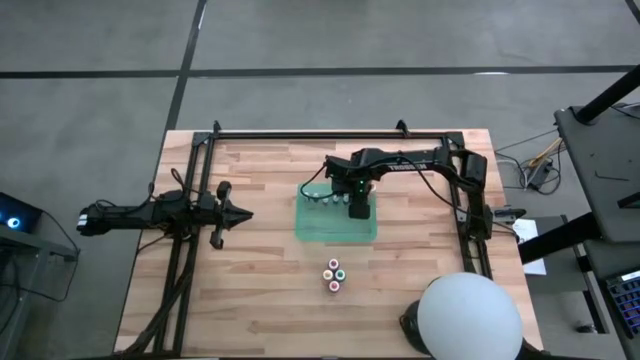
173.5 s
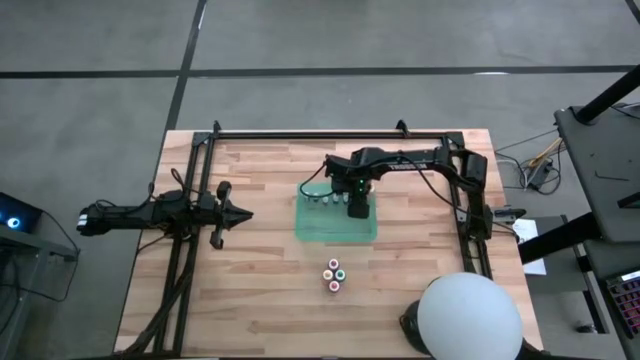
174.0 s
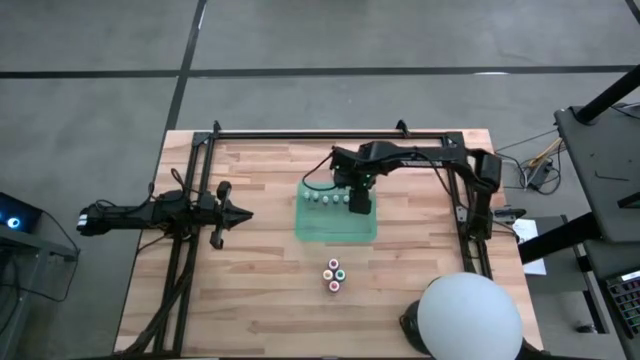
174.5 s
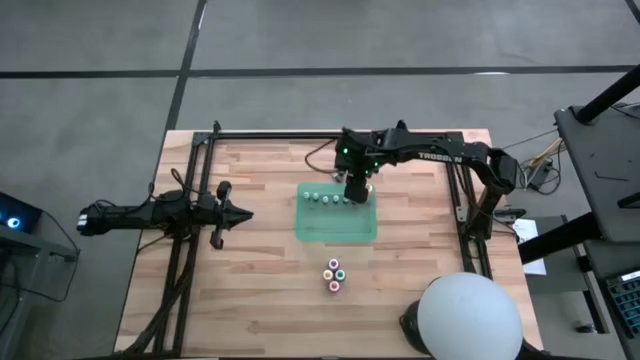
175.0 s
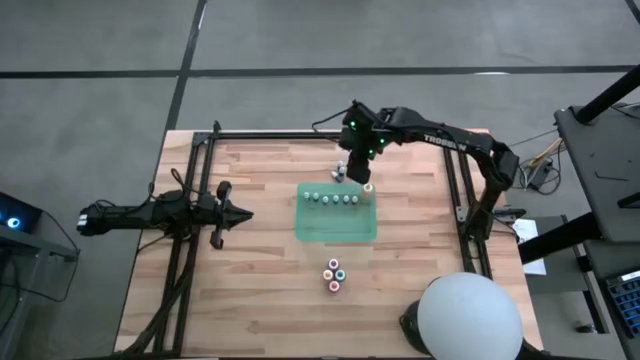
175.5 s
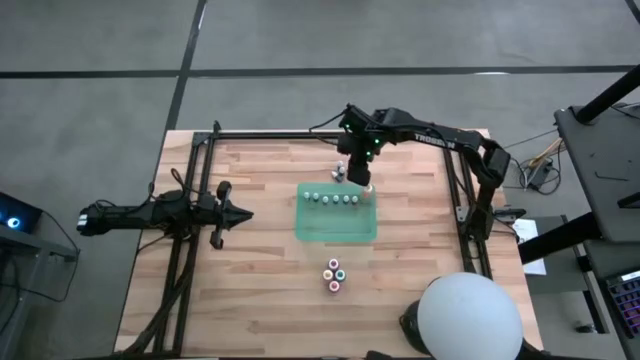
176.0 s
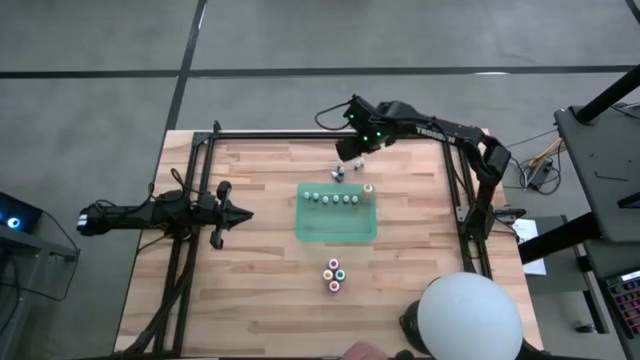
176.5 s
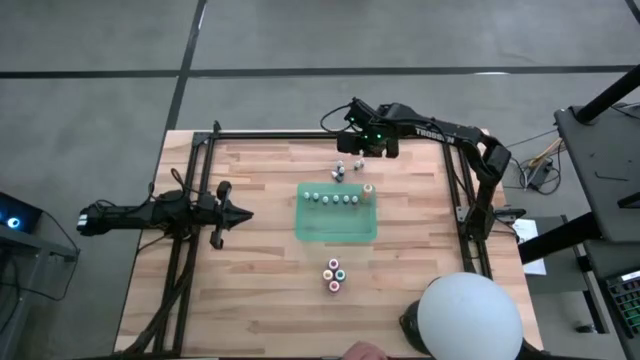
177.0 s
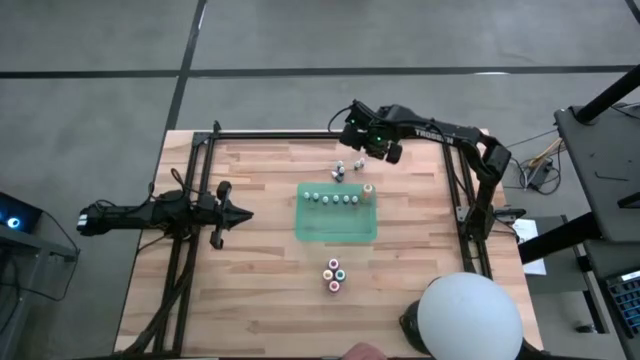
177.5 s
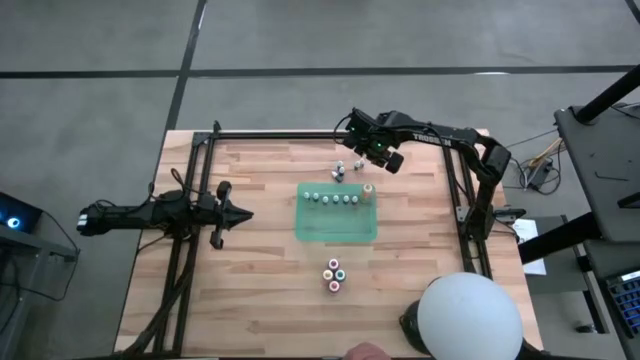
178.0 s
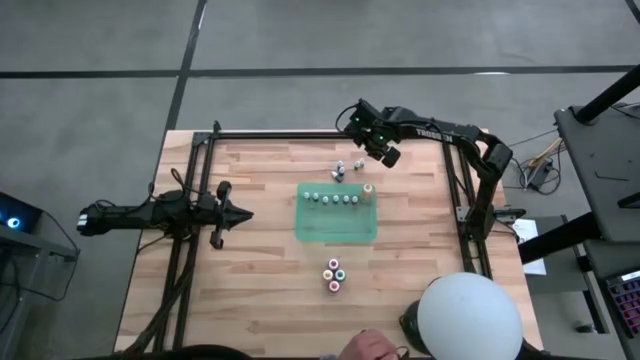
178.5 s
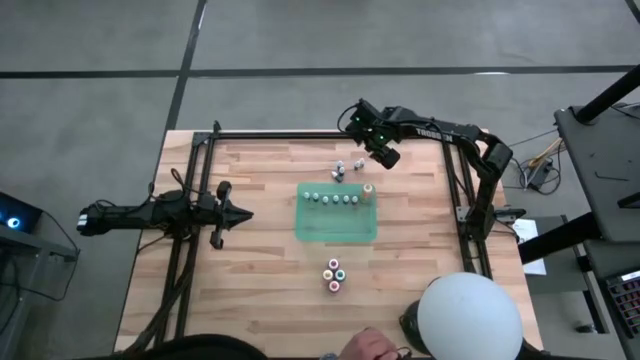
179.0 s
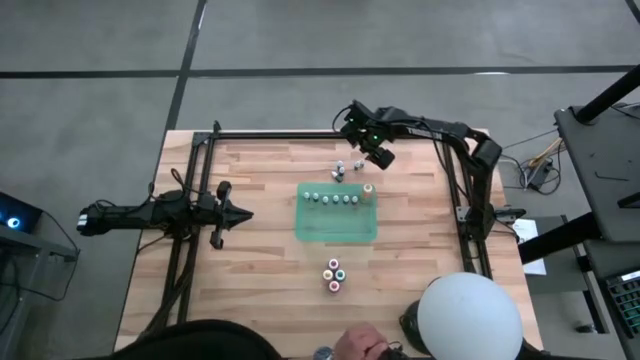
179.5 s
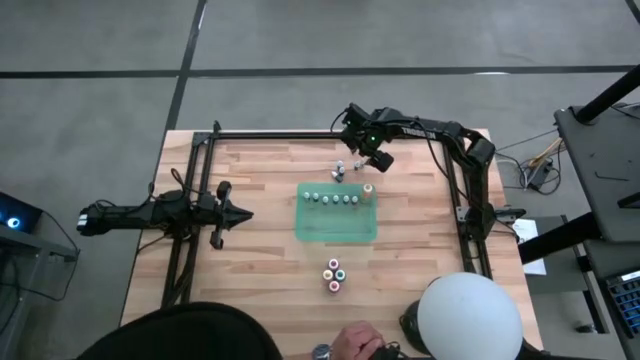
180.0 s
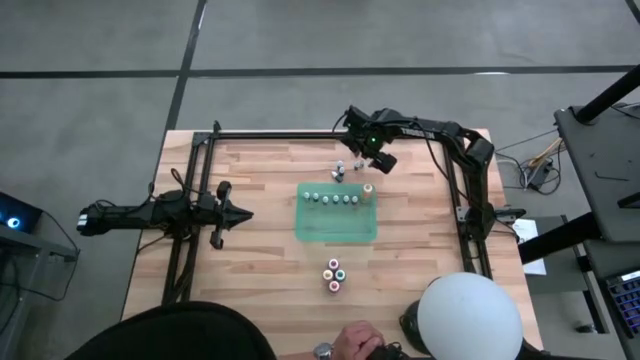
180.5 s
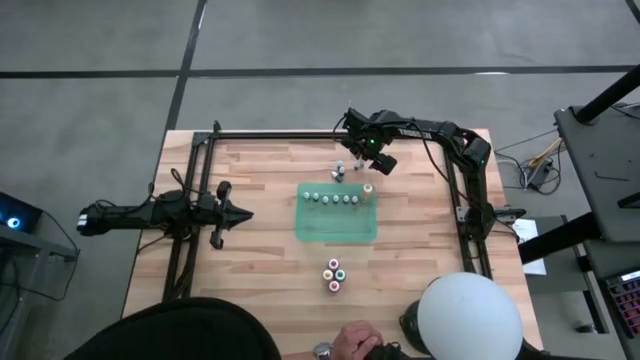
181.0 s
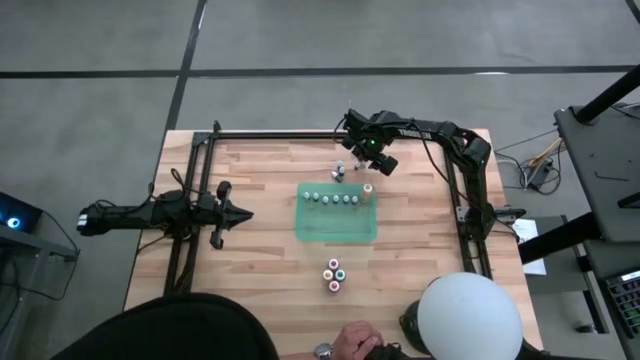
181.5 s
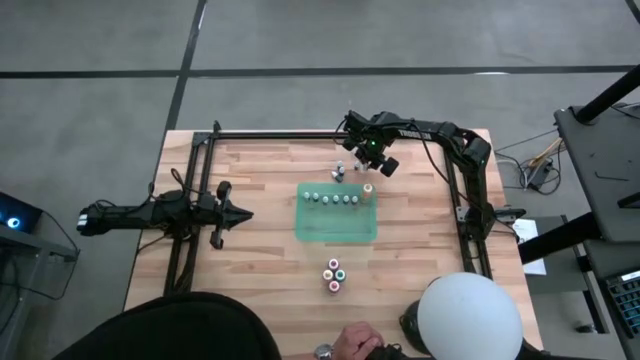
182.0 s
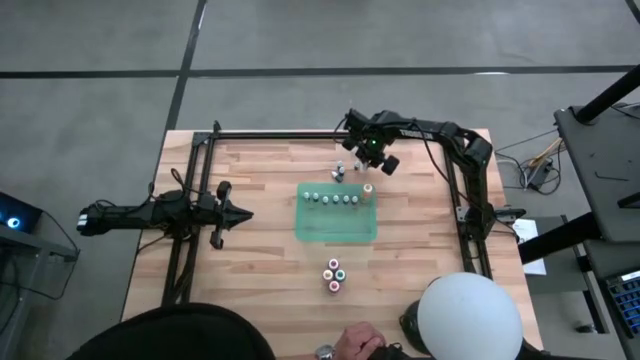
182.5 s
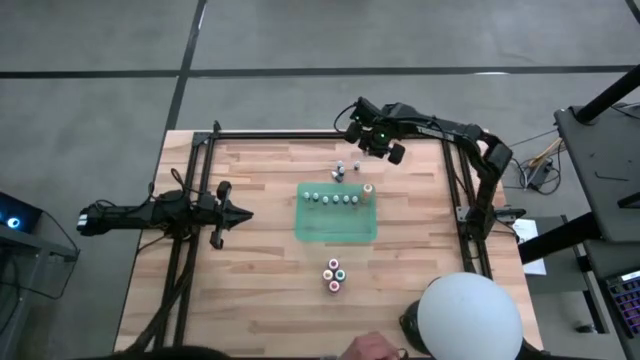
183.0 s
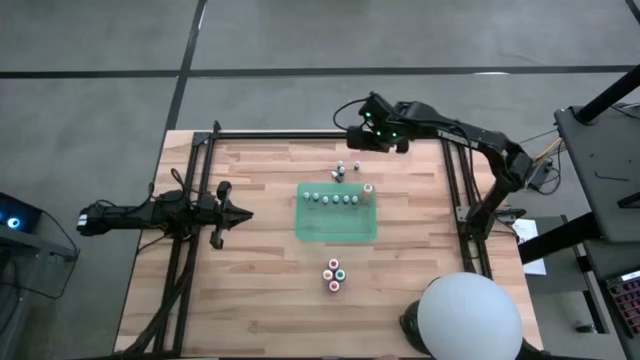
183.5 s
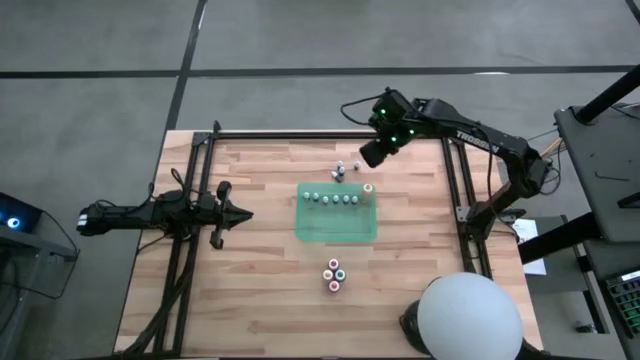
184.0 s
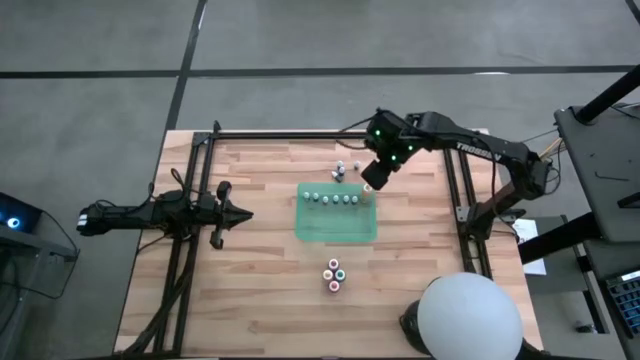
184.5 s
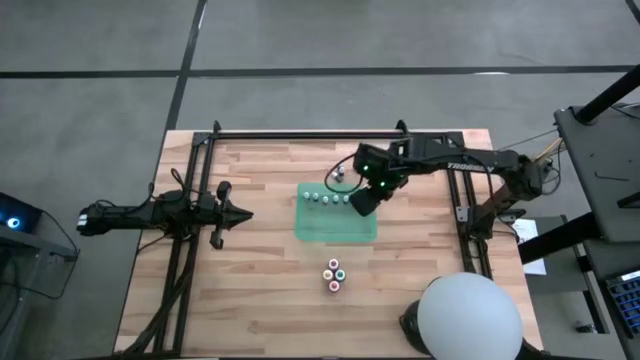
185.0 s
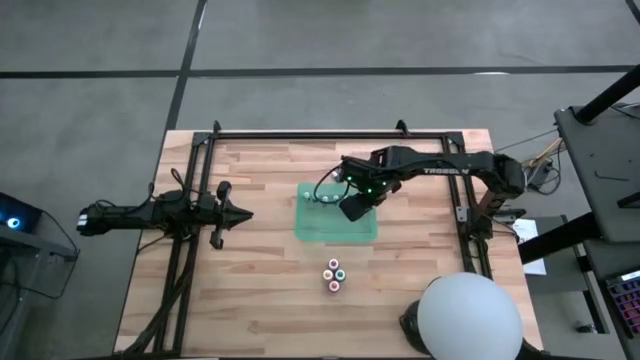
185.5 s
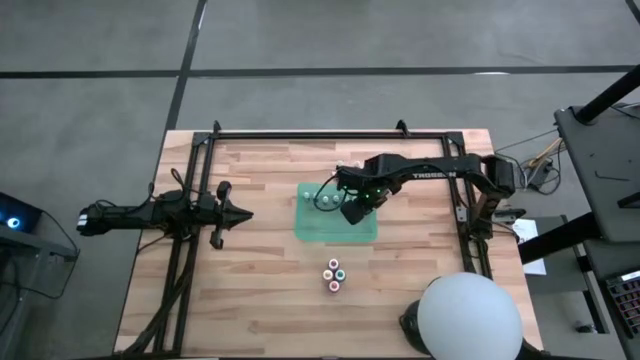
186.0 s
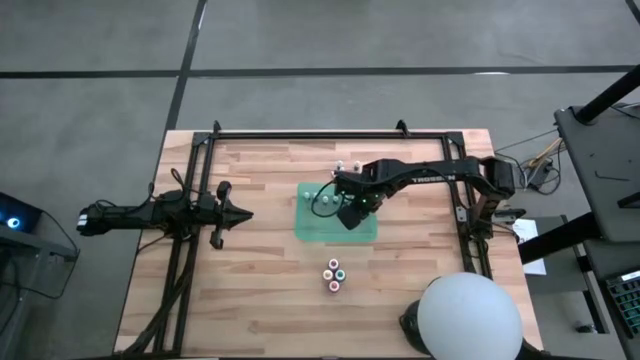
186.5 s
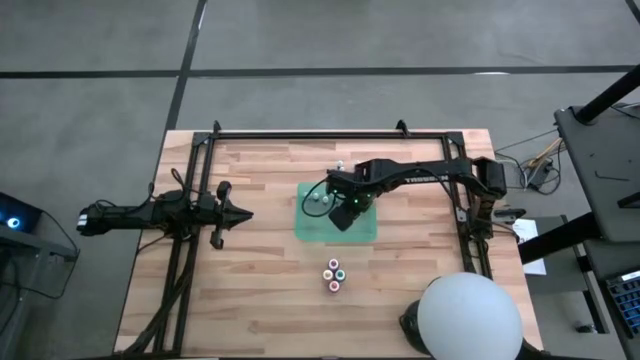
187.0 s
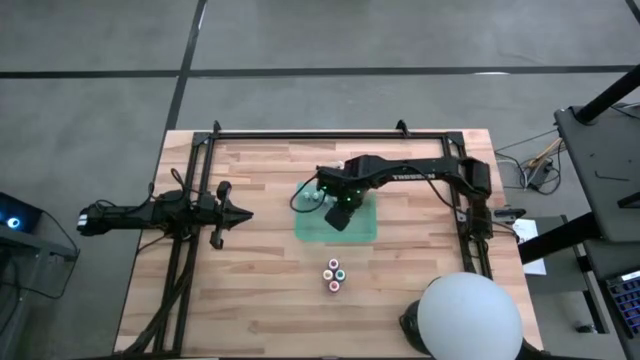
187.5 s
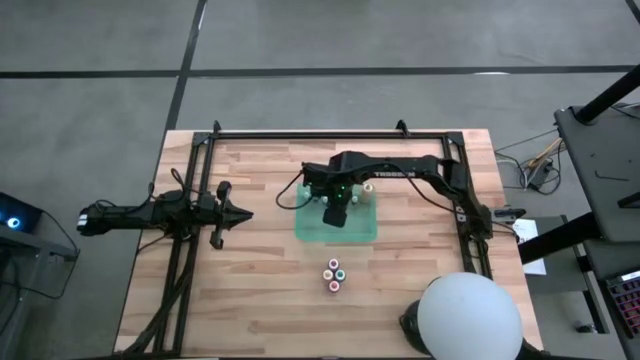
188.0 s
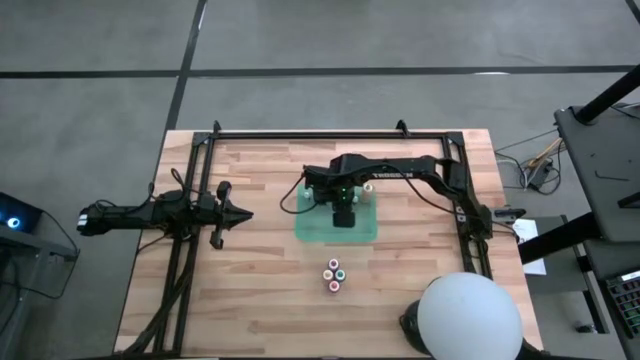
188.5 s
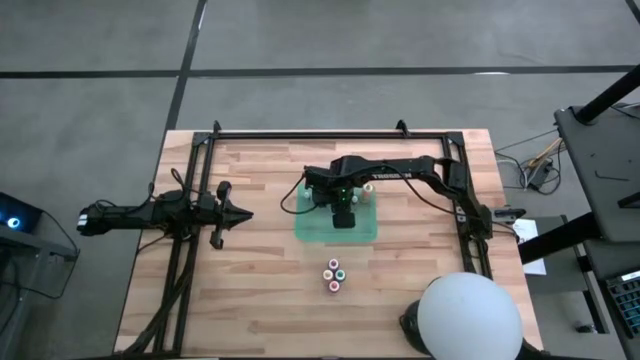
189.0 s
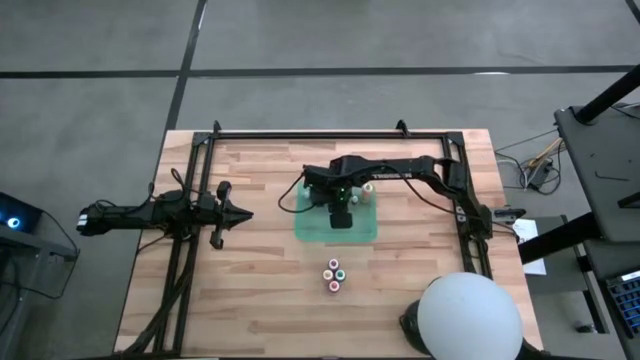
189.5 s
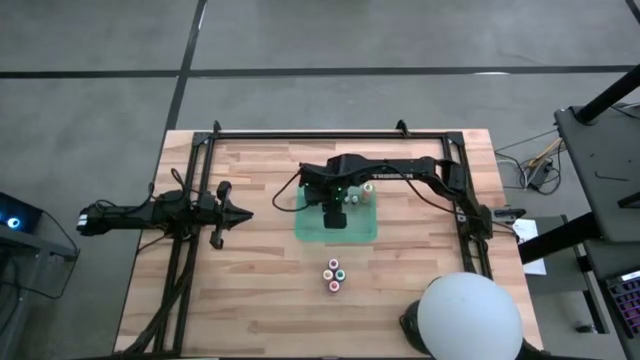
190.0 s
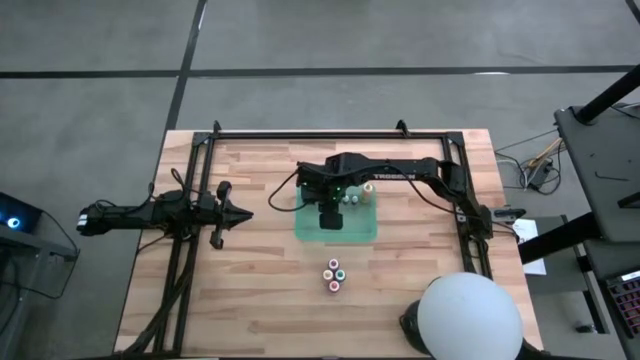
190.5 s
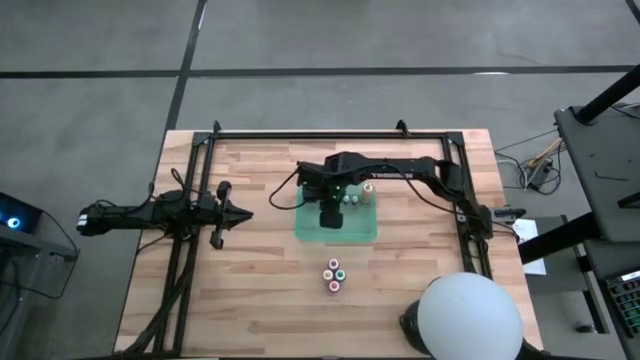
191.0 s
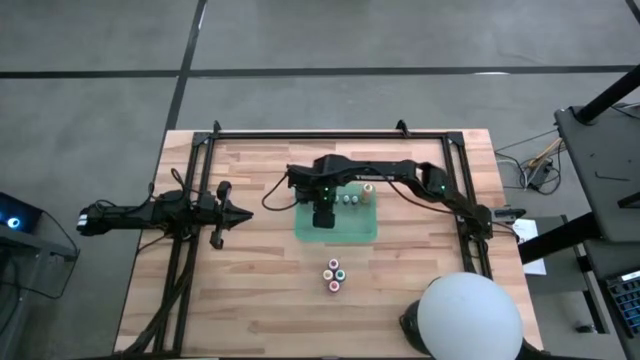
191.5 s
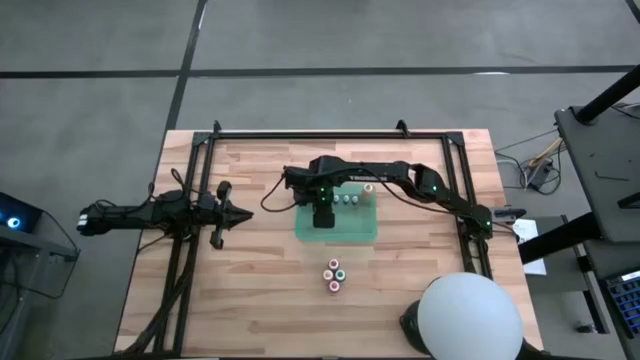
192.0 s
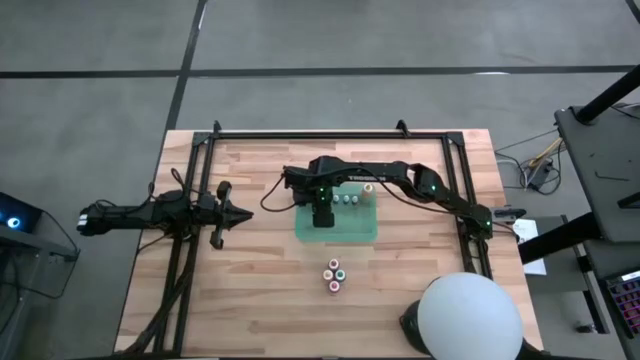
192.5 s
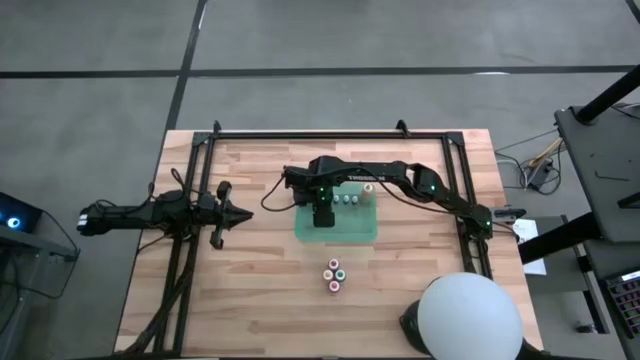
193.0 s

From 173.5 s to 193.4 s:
Task: Pick & Place food coloring
Put the small orange food coloring bottle into the green container

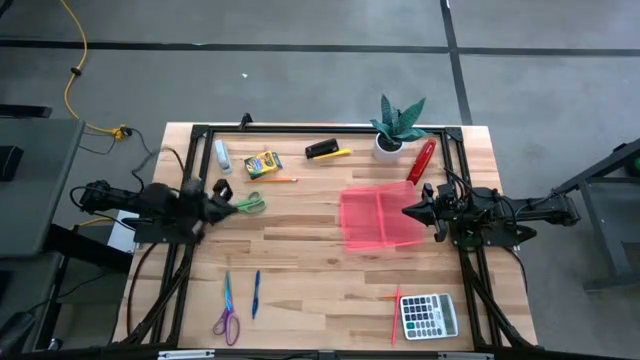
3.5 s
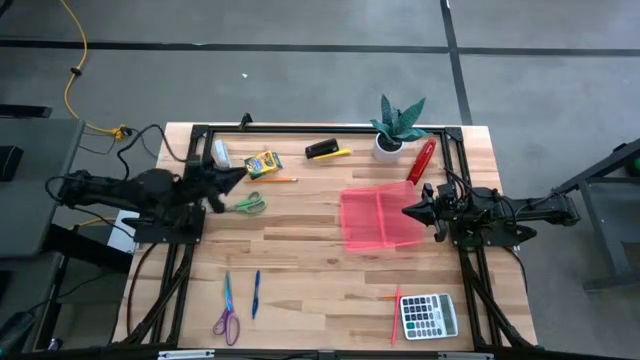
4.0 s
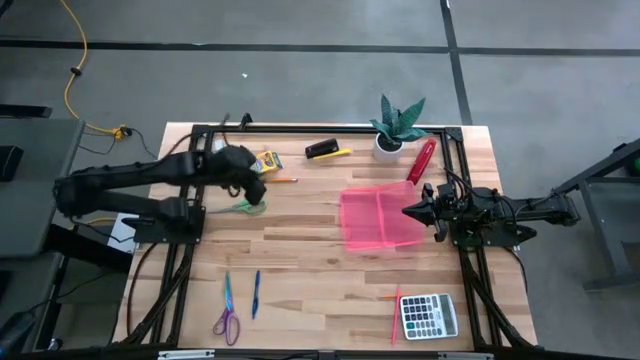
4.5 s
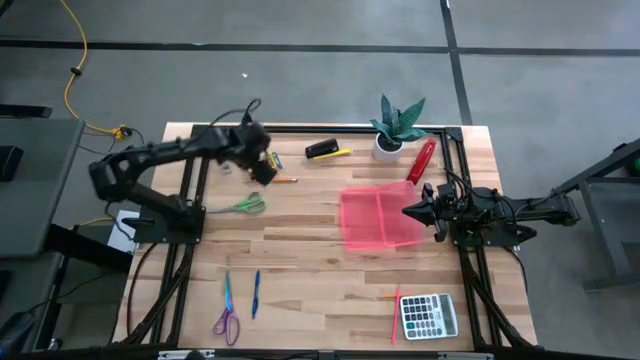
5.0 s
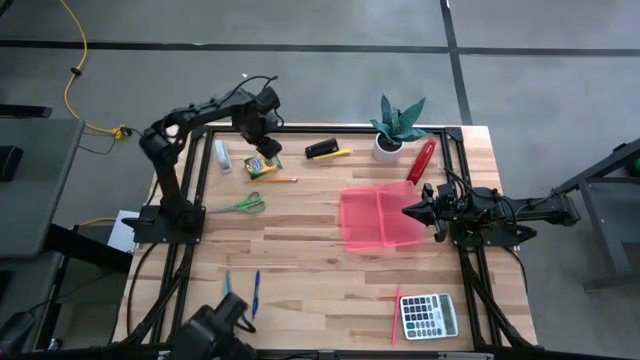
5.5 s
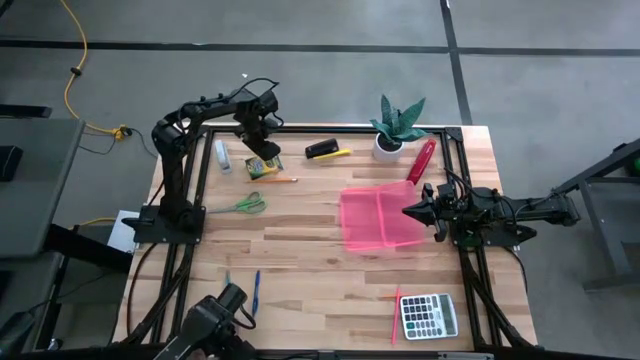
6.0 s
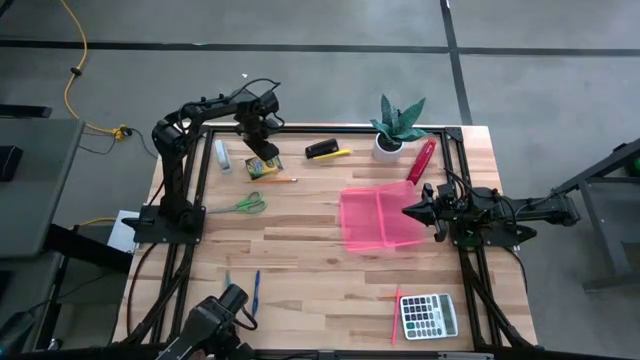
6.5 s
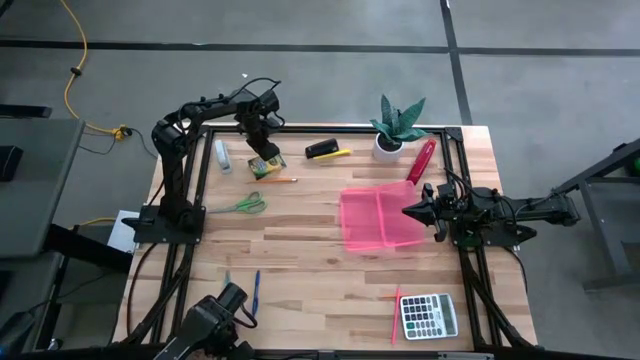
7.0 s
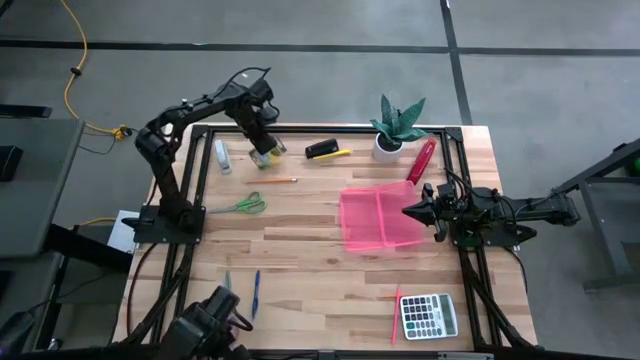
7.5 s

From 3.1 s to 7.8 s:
Task: Pack school essentials
Put the orange crayon box into the pink supply box
